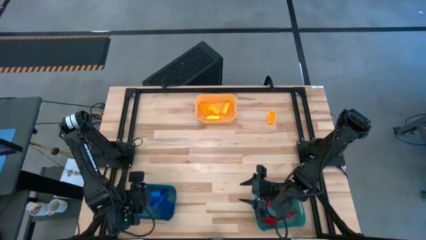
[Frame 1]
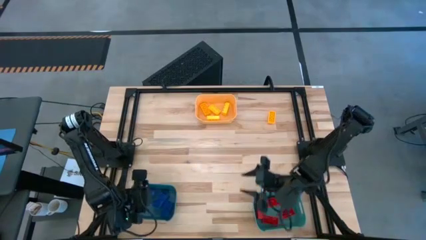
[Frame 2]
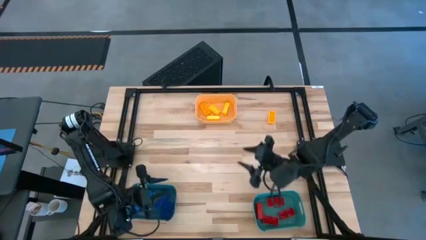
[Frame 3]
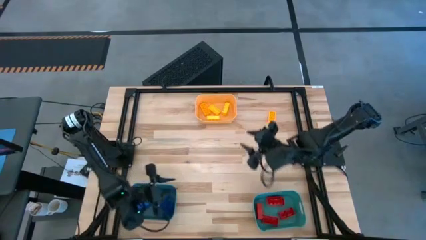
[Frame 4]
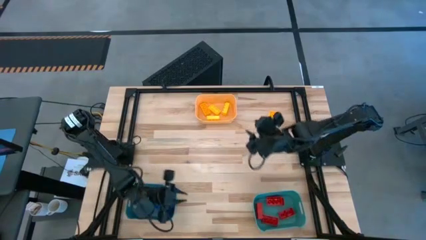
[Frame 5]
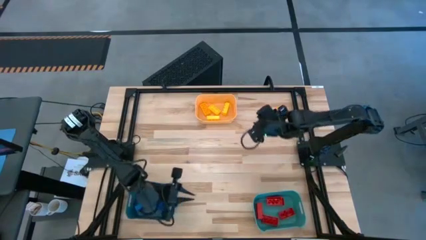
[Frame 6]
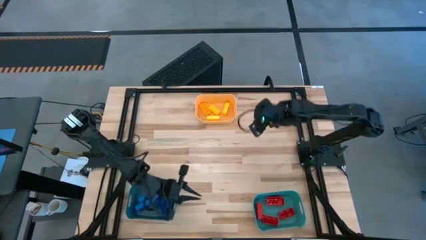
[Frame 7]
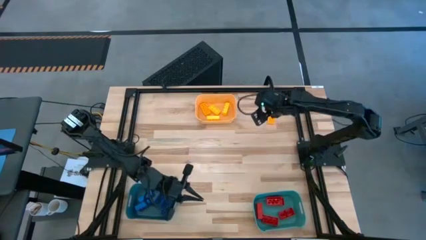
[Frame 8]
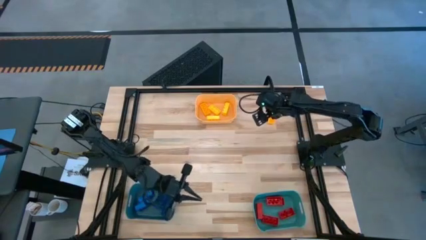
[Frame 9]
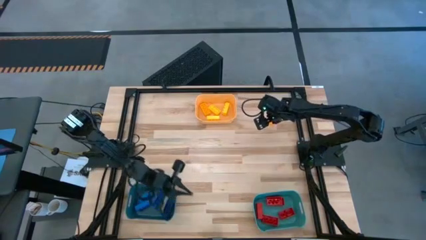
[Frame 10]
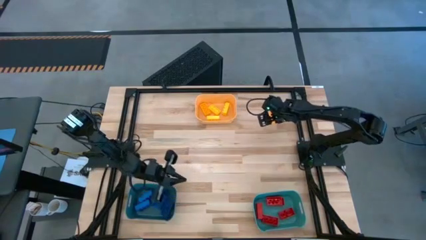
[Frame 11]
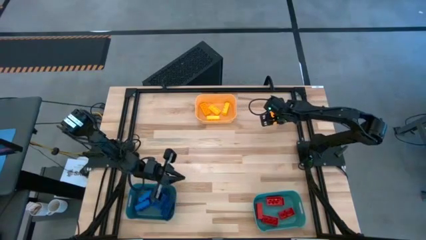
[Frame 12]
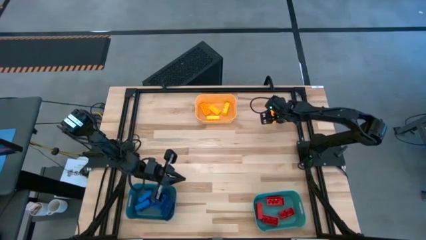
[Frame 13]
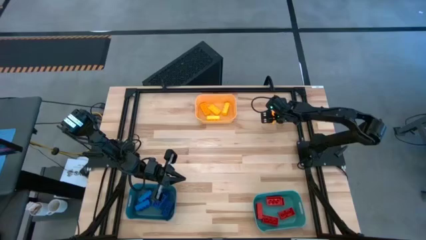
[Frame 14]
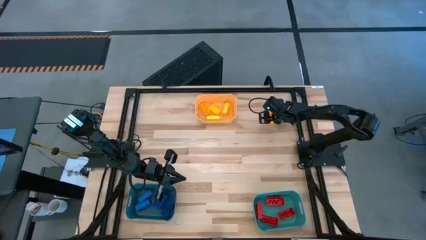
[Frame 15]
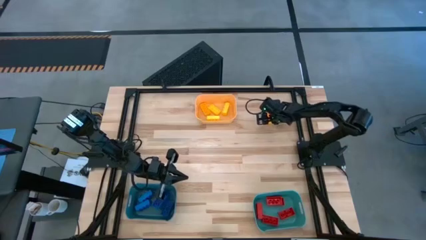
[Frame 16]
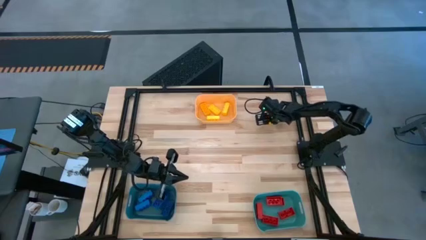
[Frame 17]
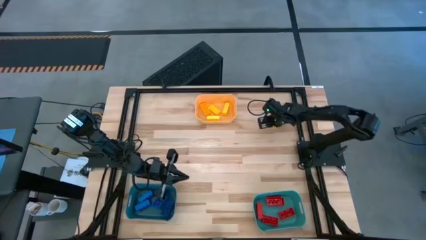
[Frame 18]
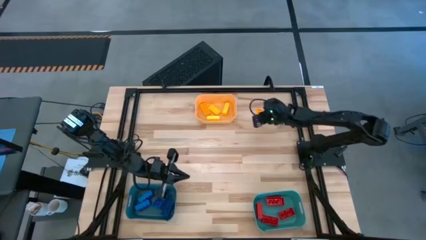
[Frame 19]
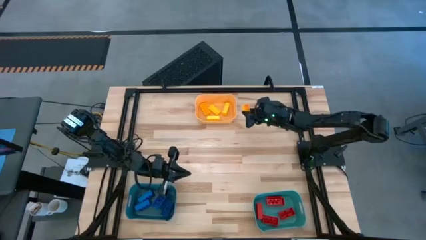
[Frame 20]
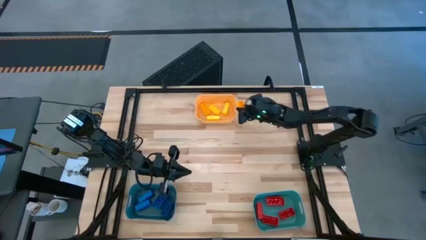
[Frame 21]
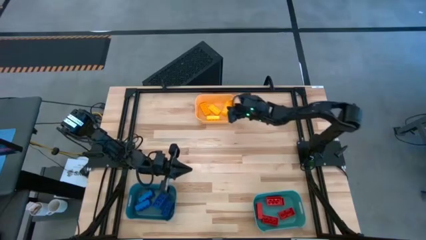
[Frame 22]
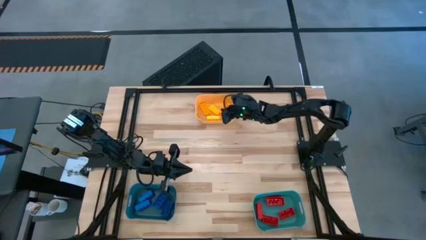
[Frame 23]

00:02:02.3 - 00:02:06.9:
Task: Sort & place blocks by color
Put the yellow game piece into the yellow bin

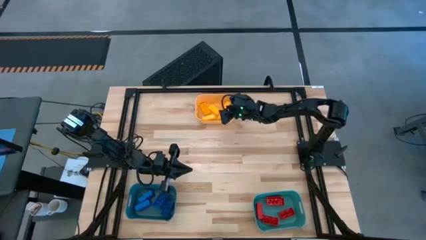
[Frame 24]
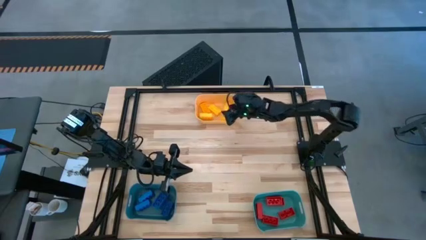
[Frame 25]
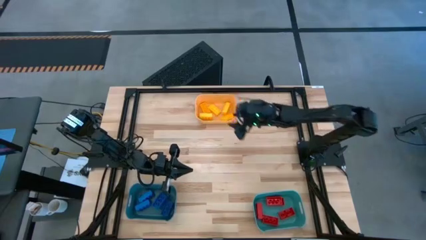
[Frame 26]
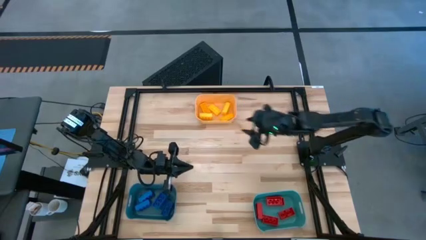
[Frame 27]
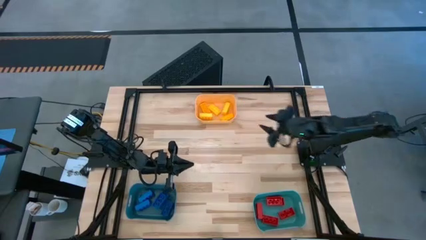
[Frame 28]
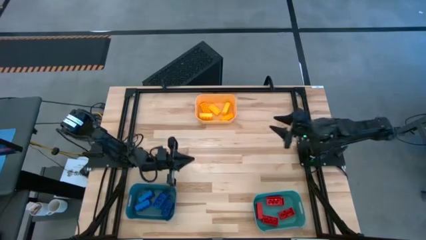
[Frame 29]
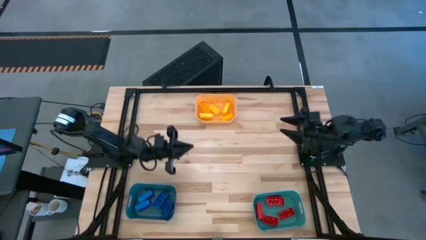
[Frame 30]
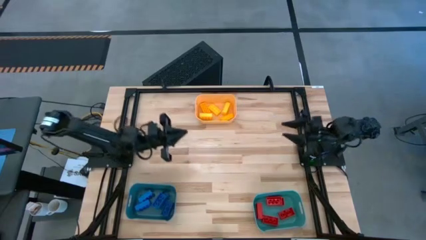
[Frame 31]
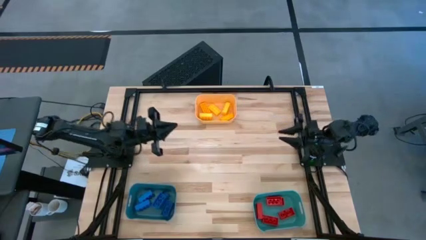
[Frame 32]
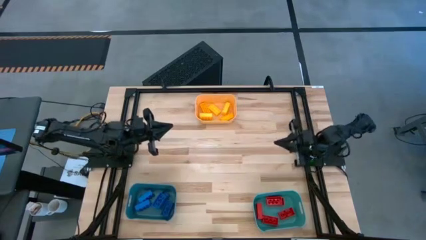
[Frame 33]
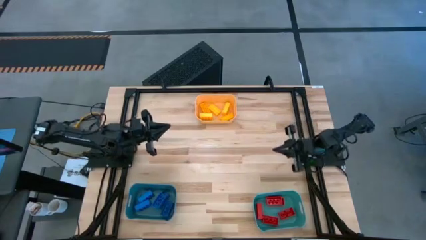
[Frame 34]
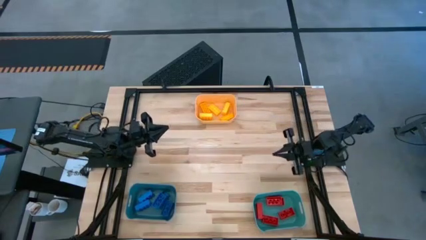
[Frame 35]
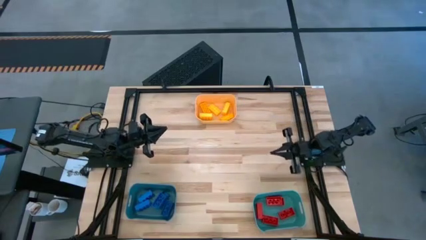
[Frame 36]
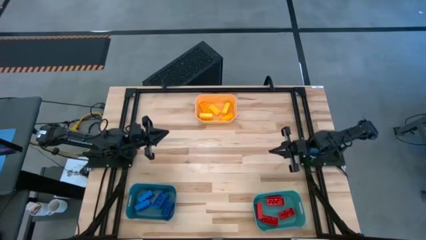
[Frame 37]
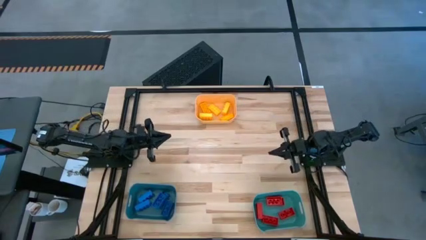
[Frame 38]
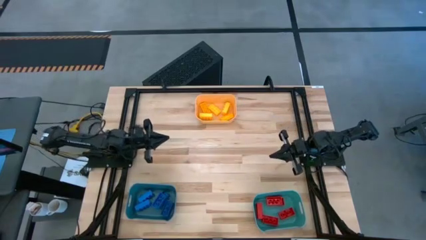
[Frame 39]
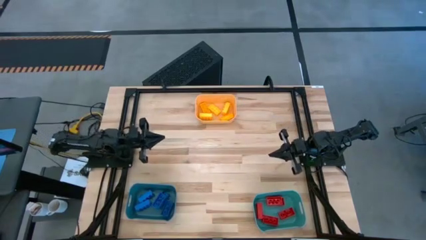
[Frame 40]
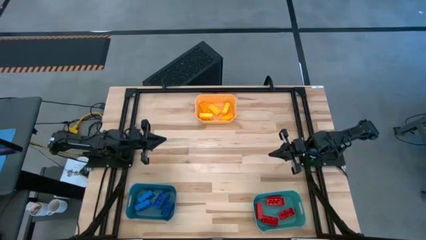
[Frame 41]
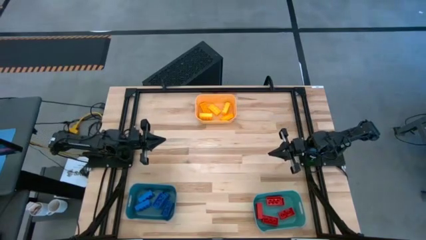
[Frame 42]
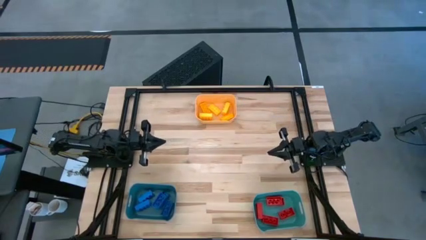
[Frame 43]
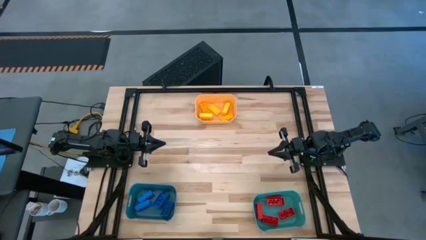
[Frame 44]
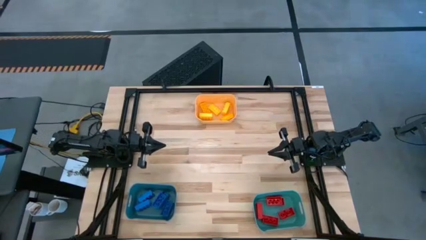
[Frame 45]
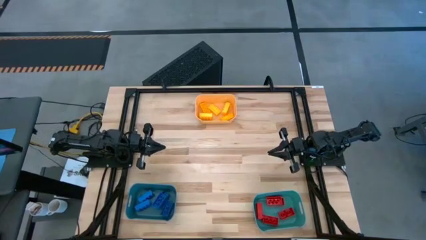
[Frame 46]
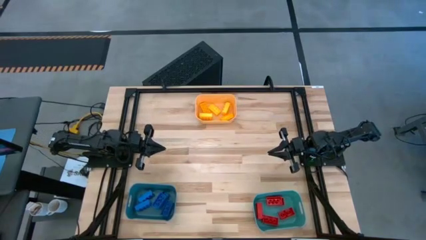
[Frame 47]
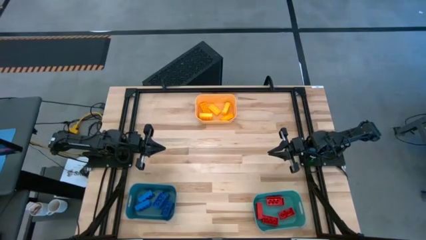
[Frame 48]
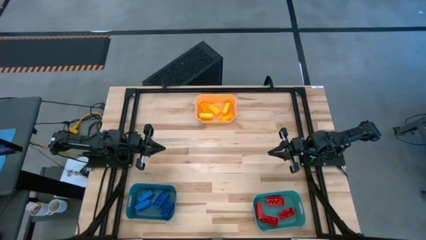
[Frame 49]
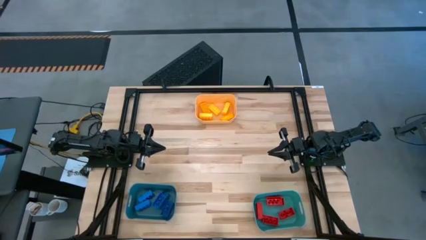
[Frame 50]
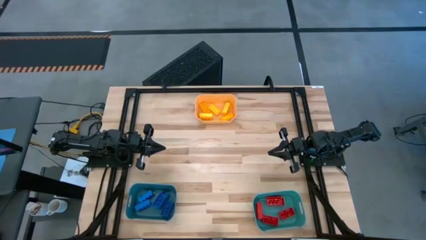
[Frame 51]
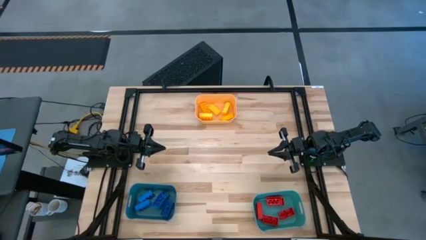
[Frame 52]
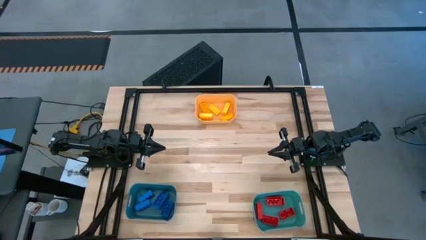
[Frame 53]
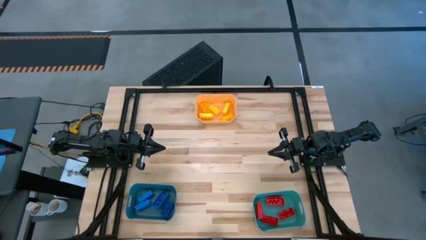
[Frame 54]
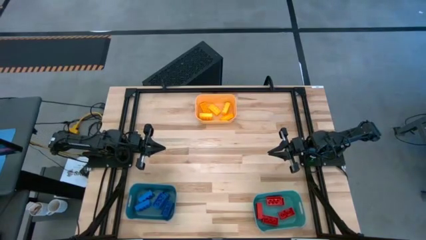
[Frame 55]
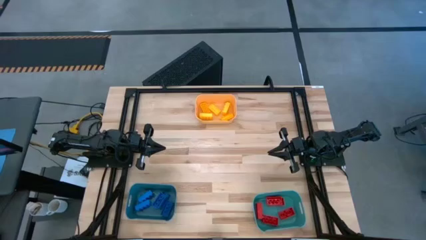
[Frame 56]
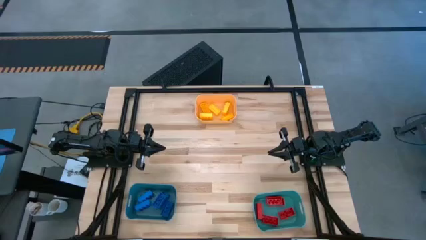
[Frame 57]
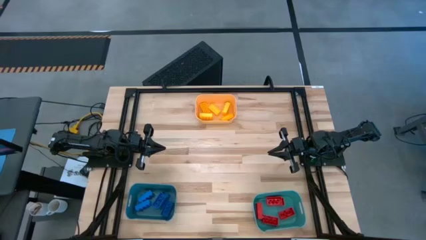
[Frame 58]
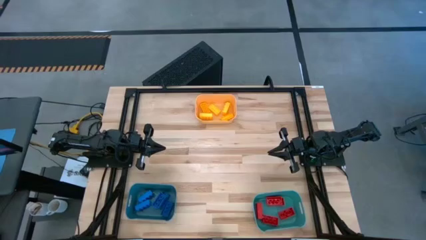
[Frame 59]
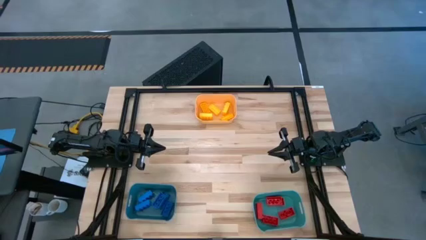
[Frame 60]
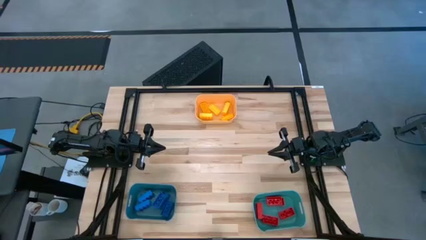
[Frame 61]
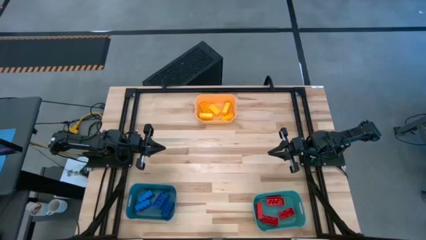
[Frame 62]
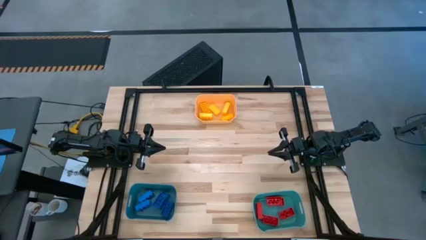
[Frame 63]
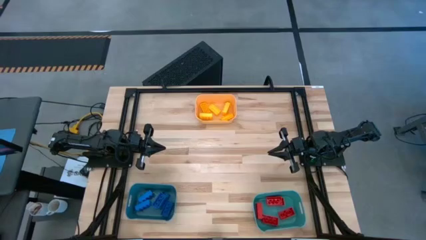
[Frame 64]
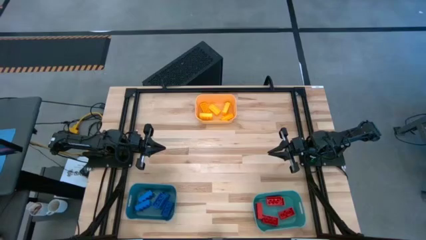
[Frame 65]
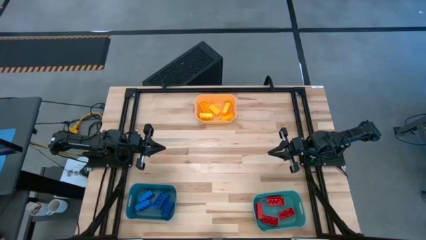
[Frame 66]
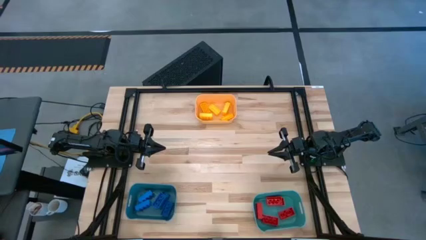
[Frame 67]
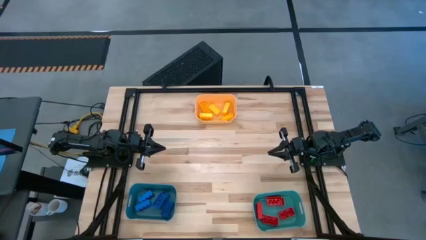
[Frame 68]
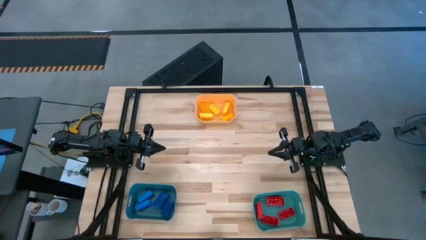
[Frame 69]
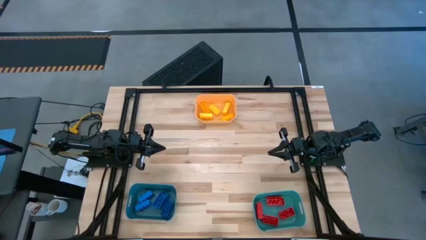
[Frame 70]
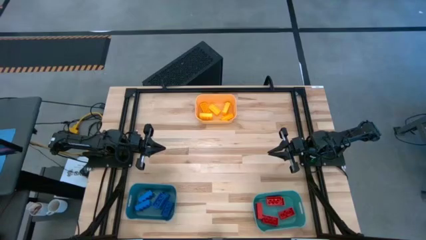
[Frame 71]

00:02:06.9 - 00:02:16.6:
Return to Home Position

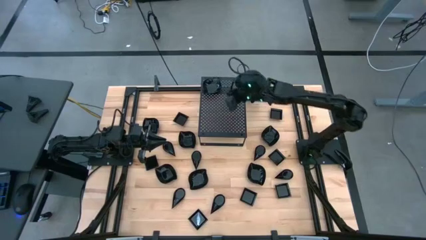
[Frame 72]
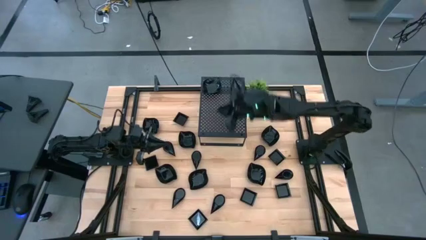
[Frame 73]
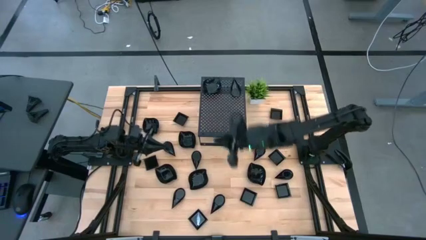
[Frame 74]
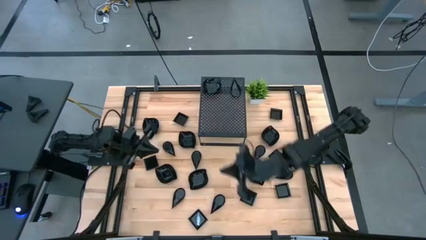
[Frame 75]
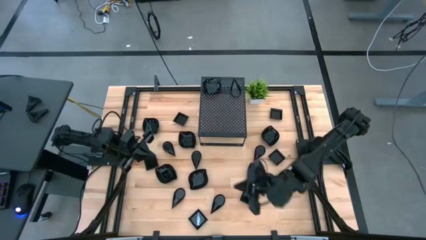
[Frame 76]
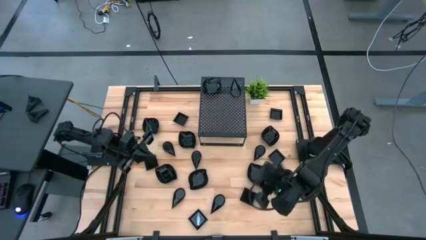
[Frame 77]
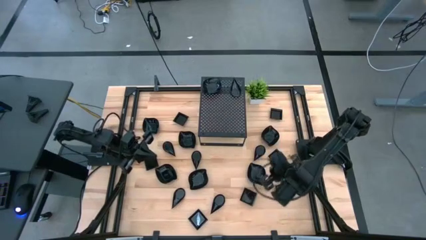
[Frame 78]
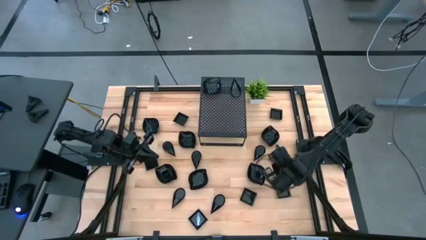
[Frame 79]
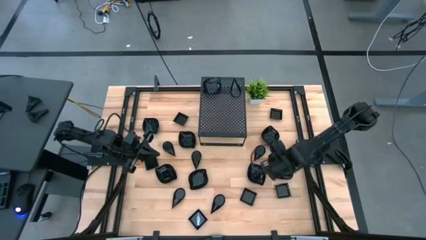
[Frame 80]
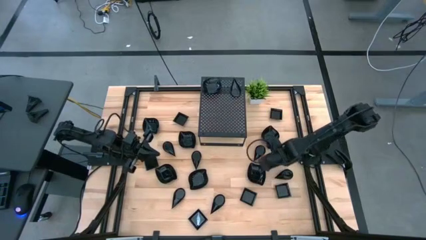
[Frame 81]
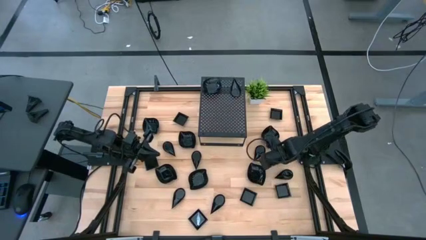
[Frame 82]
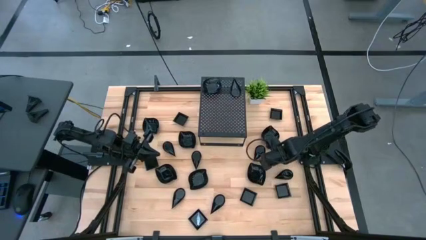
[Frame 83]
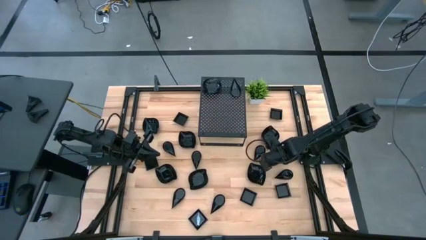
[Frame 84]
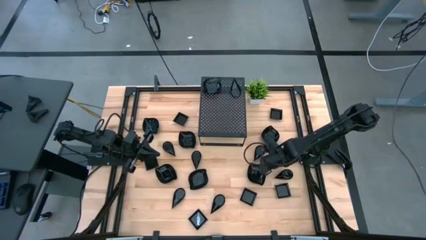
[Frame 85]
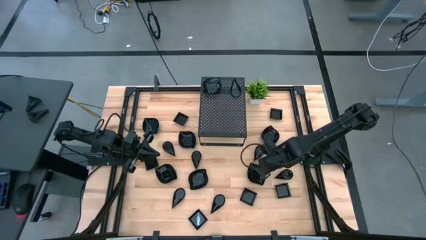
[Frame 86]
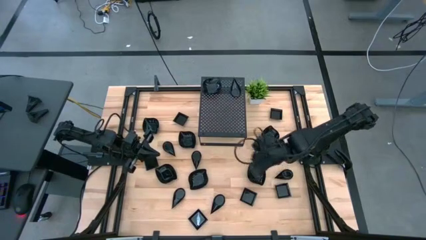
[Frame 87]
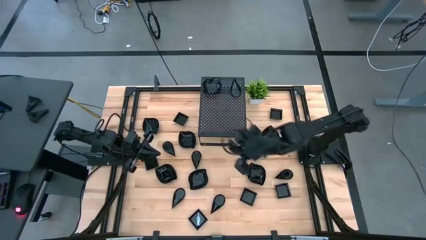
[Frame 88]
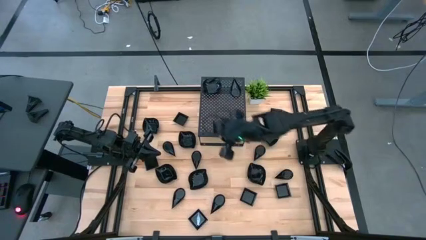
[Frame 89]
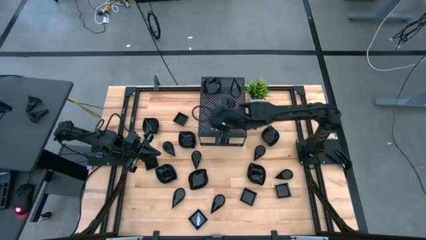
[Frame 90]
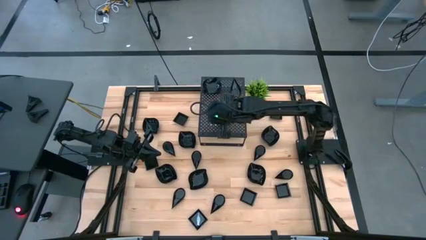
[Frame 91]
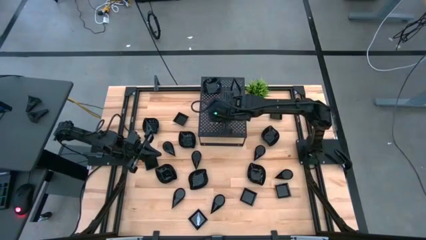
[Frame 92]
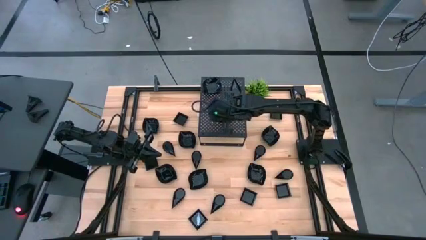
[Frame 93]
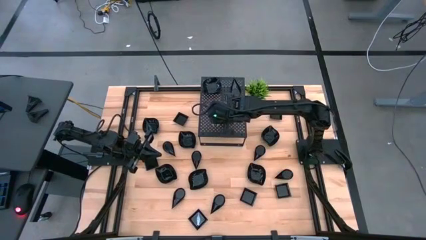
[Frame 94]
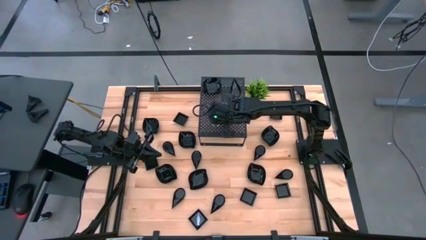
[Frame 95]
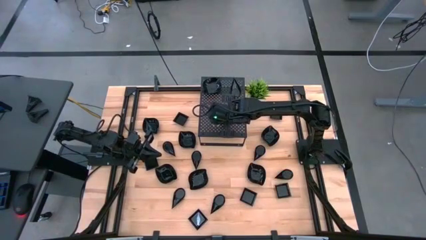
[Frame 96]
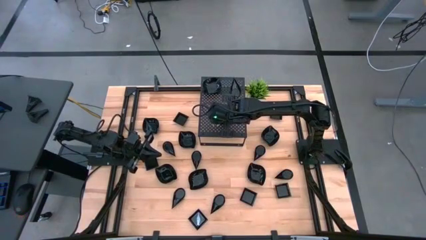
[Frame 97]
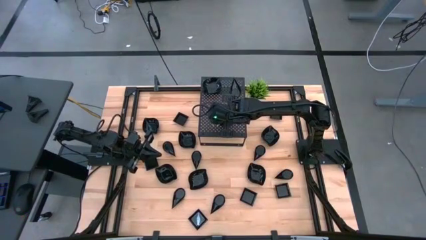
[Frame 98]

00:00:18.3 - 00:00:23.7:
Task: Pick & Place Mini shaped plates
Put the black square-shaped plate on the shelf
